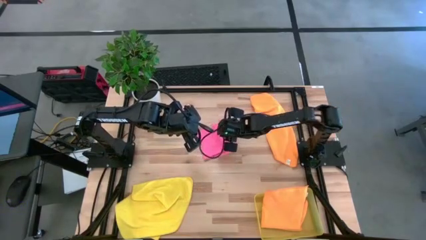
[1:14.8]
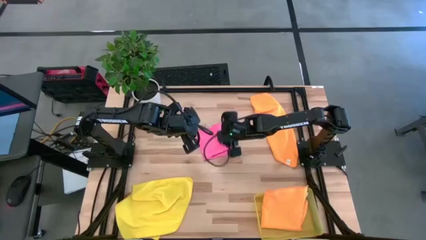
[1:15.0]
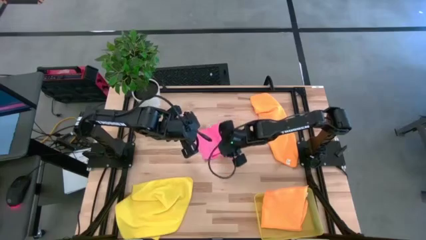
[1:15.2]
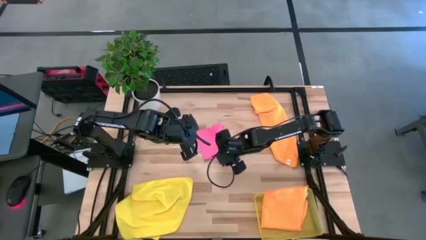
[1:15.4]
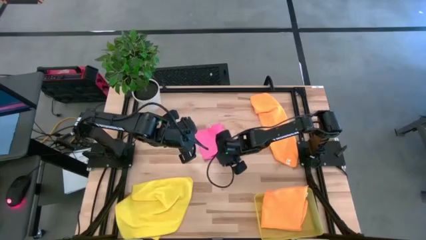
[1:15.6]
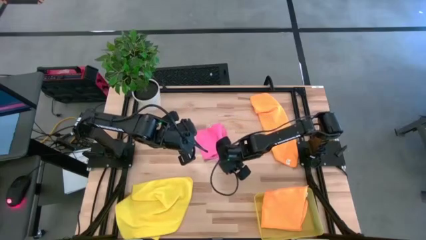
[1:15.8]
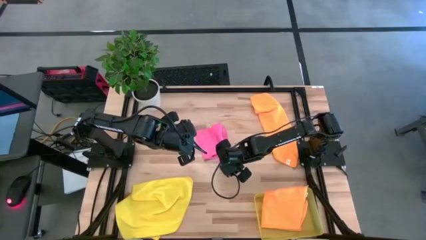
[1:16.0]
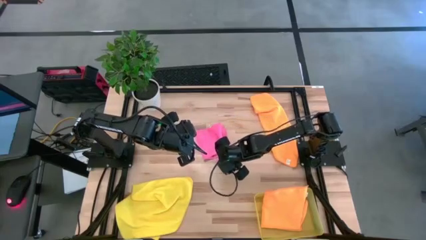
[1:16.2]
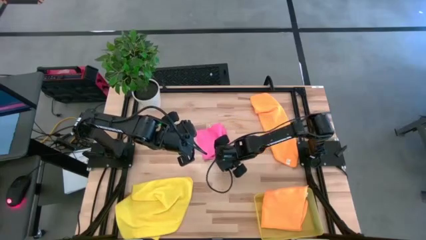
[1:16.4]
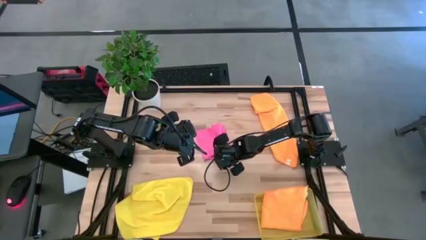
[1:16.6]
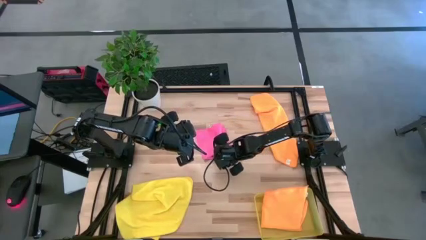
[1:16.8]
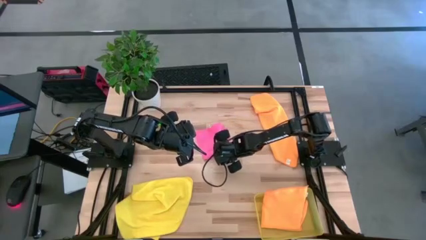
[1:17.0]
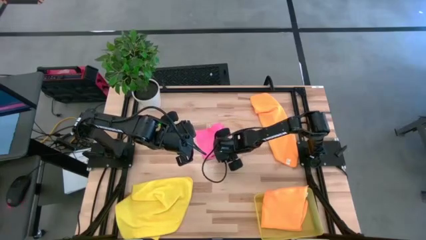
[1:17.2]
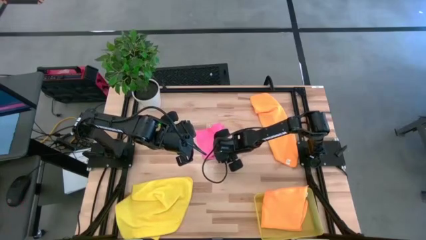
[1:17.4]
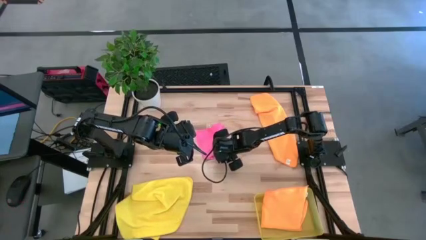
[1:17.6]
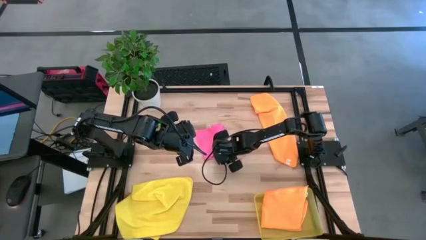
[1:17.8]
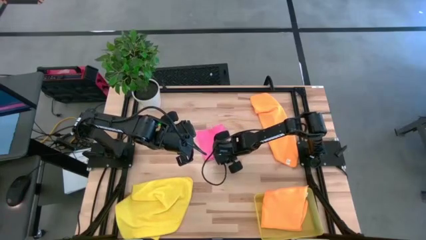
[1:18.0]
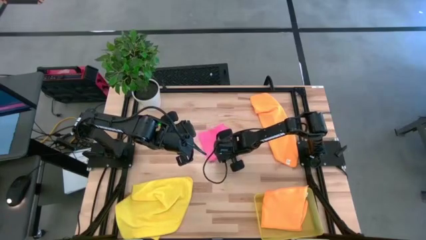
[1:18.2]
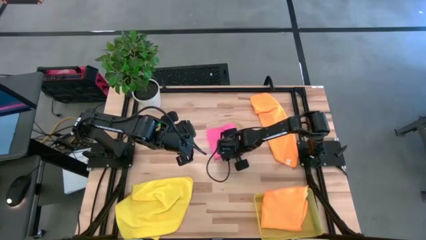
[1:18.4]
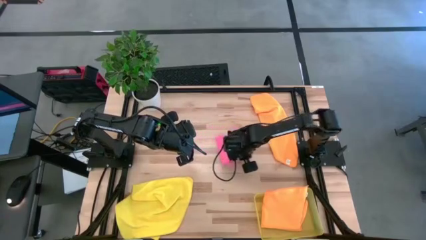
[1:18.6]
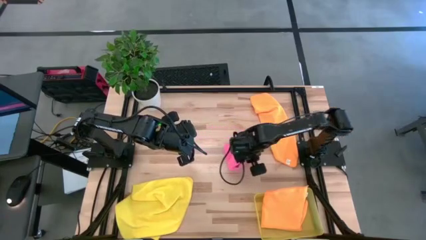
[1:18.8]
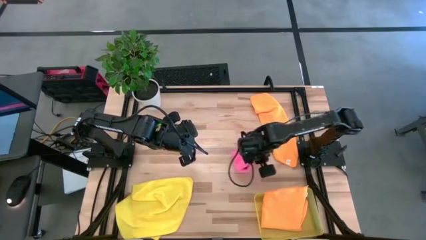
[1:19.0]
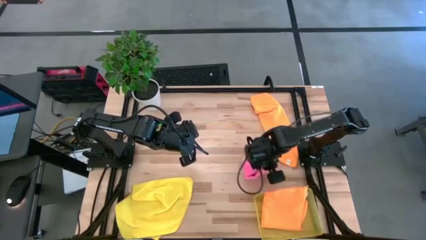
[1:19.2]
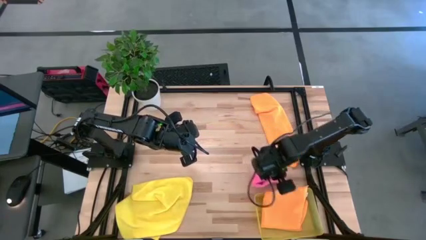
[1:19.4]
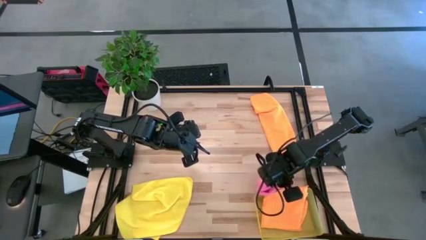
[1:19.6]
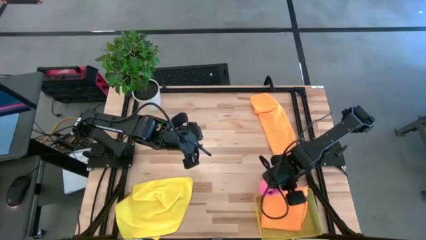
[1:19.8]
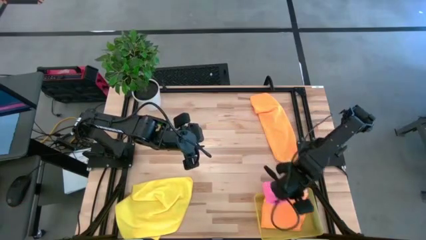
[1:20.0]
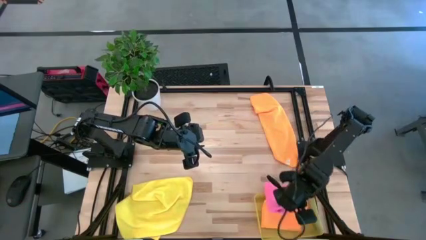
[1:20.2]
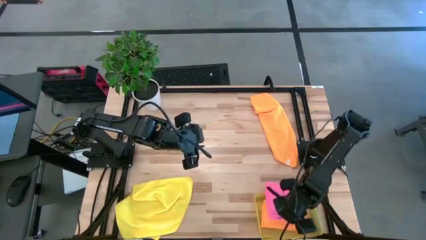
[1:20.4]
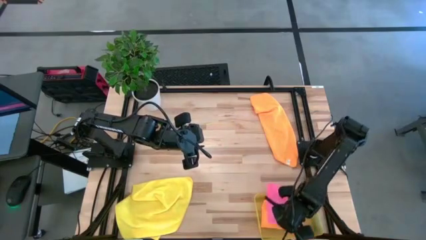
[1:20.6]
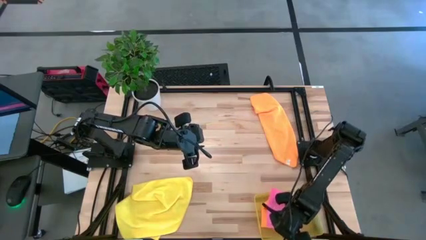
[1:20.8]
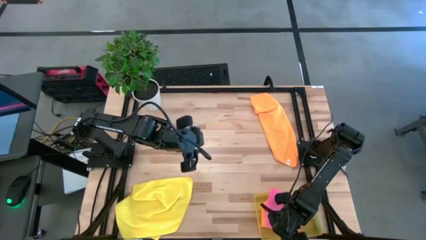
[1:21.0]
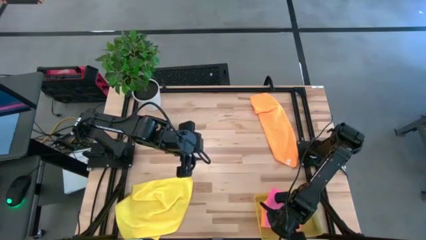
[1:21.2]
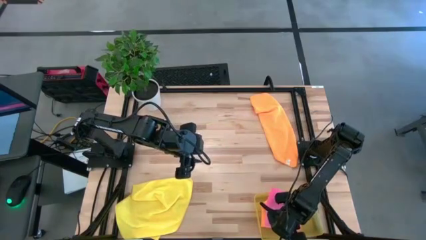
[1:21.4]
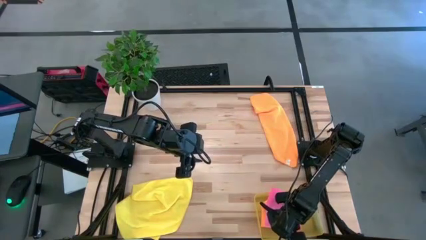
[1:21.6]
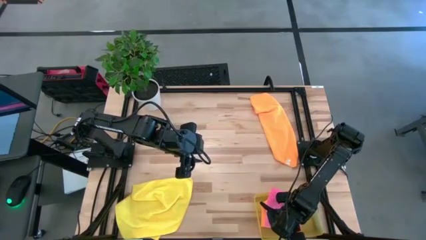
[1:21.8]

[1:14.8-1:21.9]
Task: Fold microfiber towels
Put the pink microfiber cloth into the bin

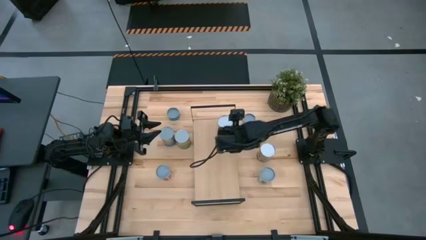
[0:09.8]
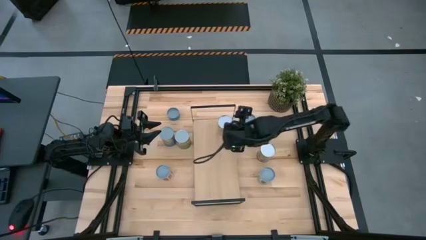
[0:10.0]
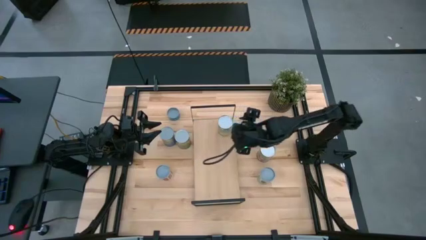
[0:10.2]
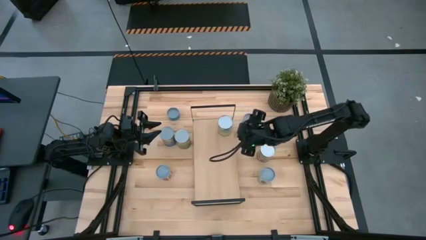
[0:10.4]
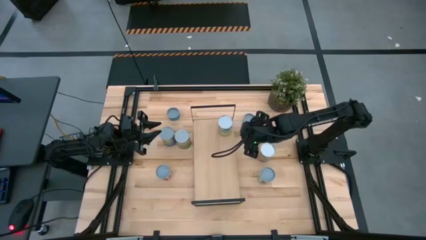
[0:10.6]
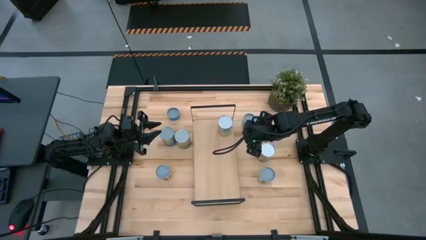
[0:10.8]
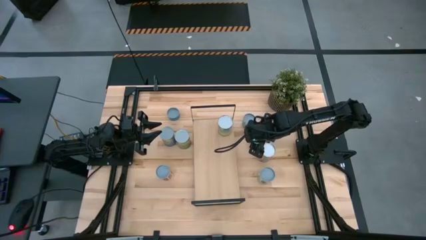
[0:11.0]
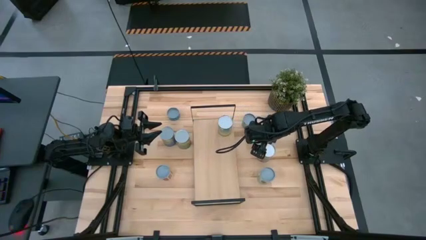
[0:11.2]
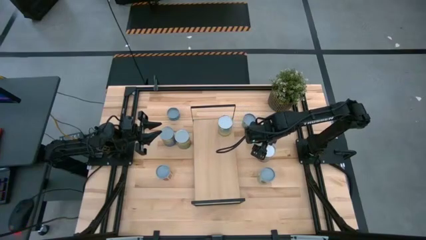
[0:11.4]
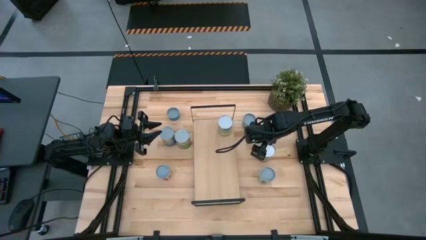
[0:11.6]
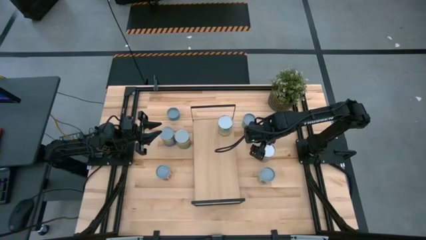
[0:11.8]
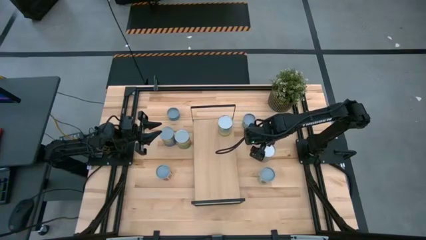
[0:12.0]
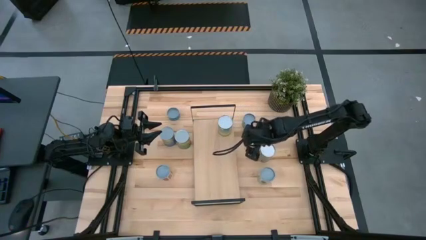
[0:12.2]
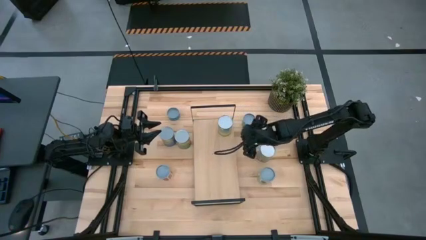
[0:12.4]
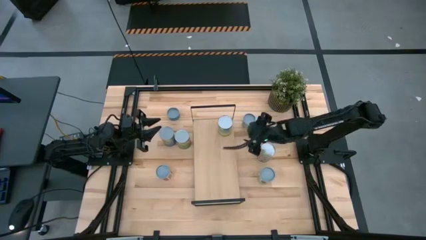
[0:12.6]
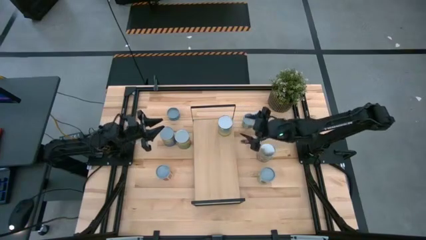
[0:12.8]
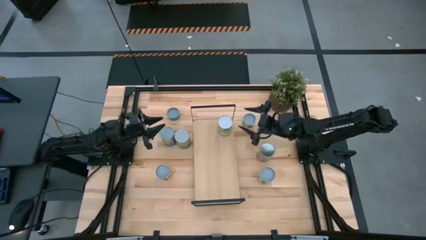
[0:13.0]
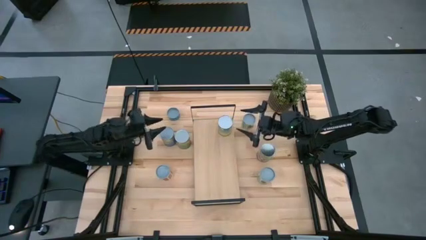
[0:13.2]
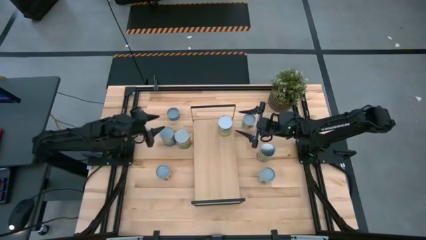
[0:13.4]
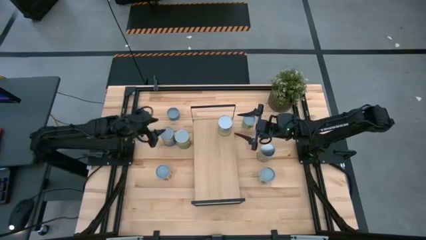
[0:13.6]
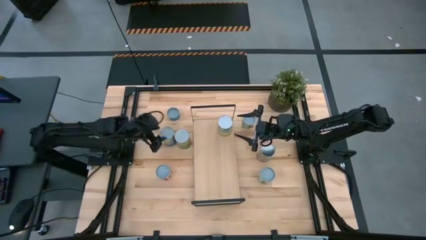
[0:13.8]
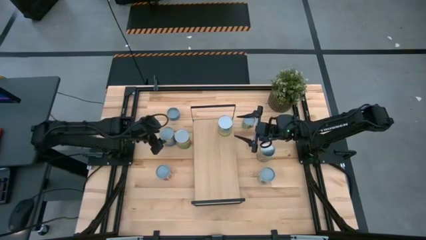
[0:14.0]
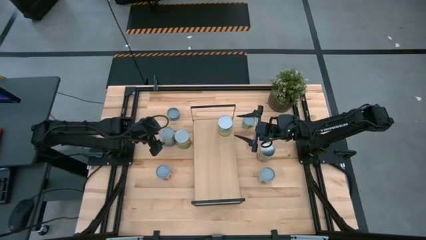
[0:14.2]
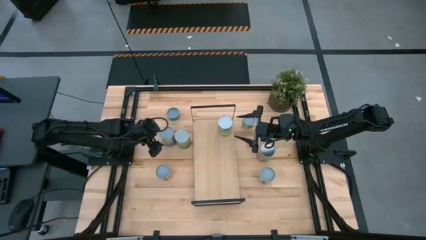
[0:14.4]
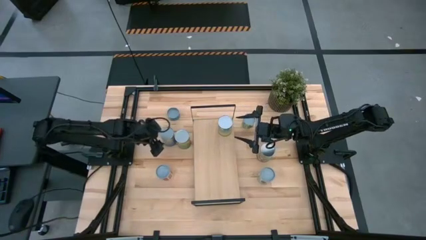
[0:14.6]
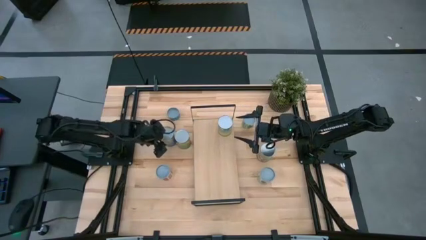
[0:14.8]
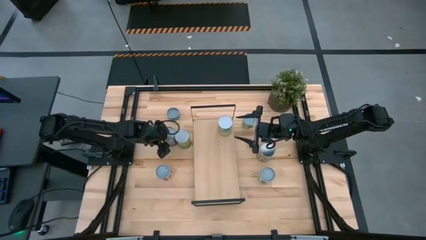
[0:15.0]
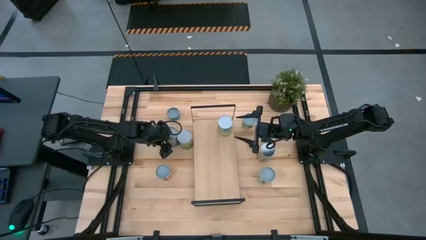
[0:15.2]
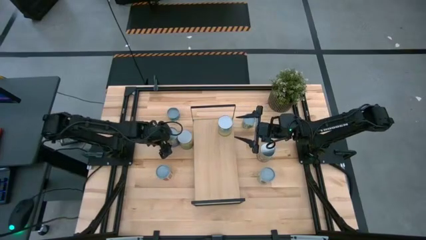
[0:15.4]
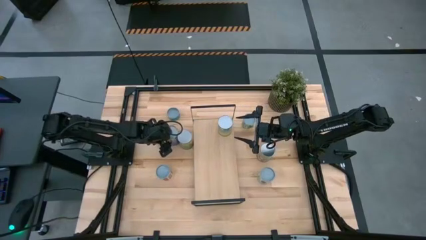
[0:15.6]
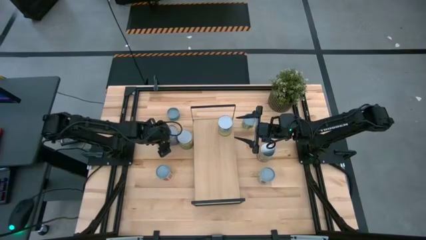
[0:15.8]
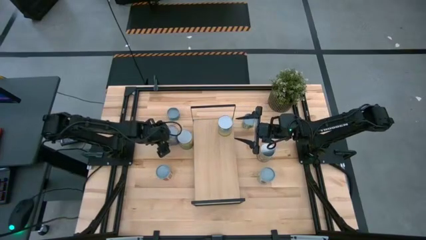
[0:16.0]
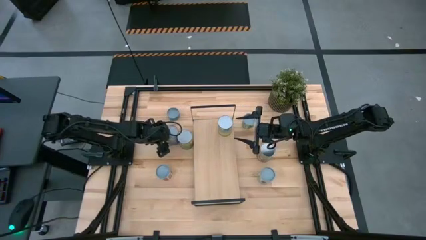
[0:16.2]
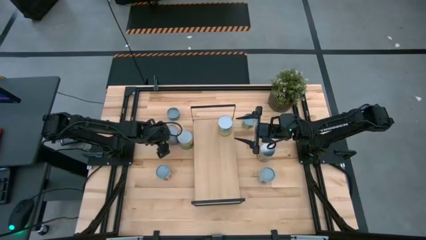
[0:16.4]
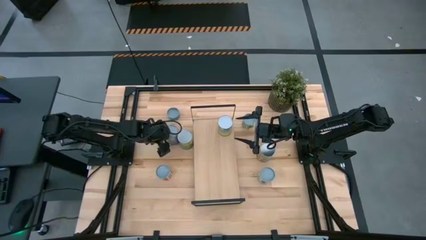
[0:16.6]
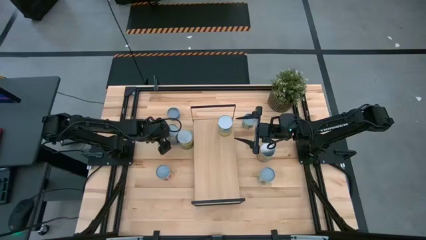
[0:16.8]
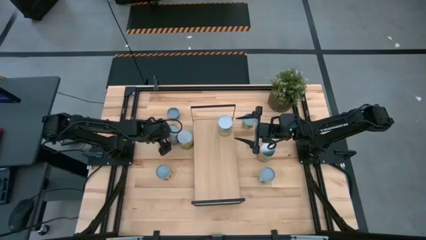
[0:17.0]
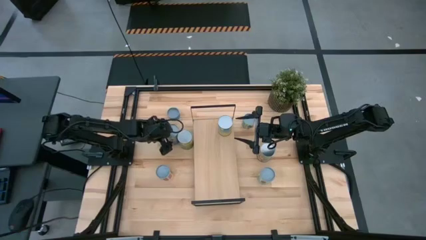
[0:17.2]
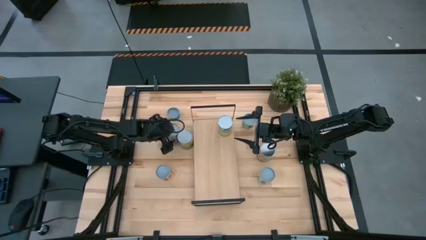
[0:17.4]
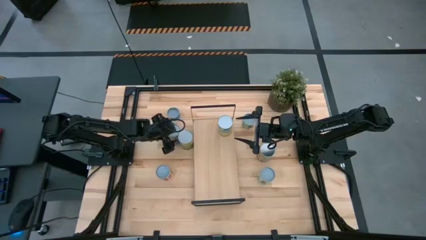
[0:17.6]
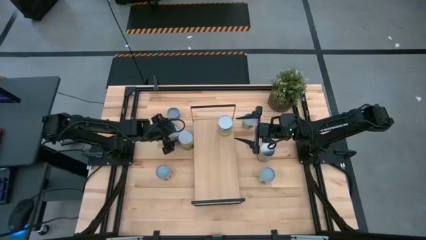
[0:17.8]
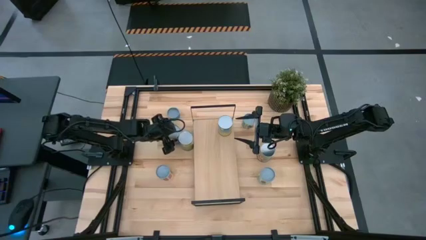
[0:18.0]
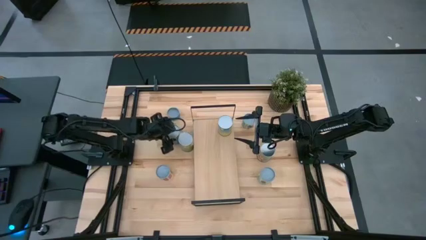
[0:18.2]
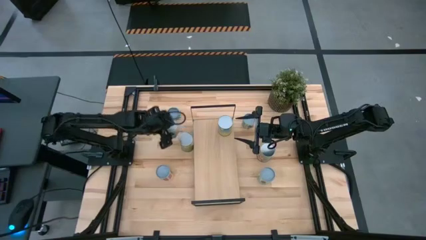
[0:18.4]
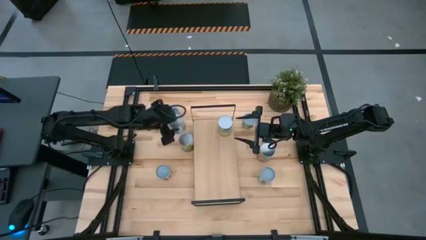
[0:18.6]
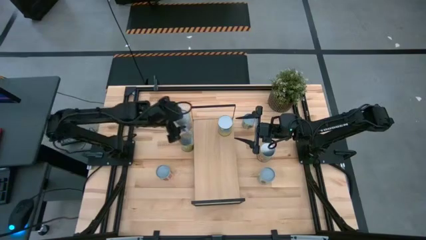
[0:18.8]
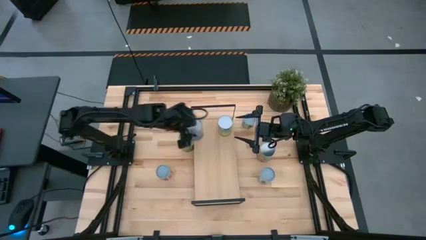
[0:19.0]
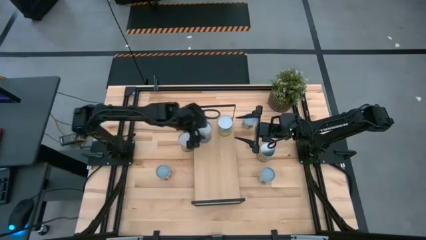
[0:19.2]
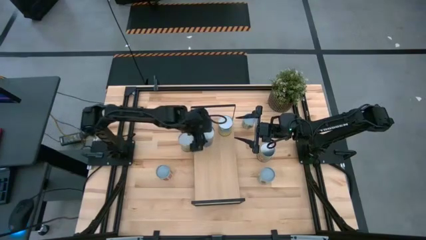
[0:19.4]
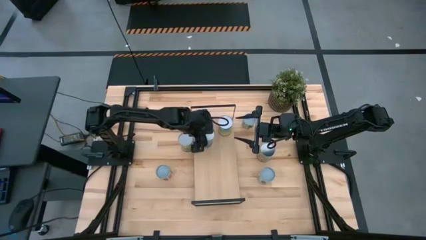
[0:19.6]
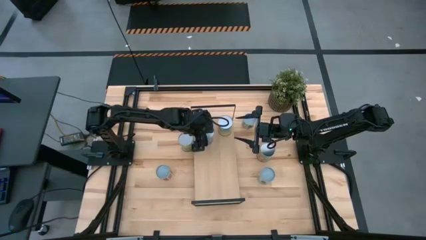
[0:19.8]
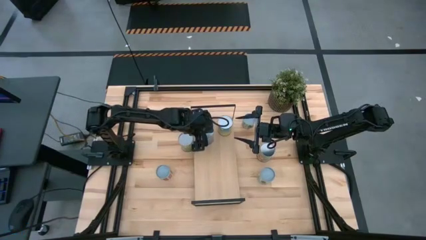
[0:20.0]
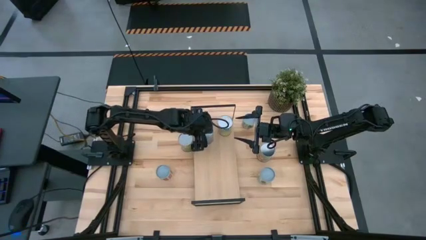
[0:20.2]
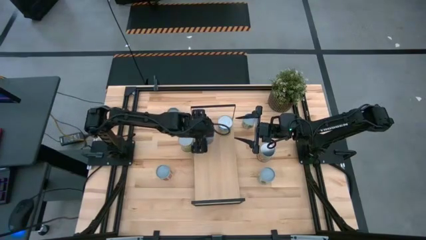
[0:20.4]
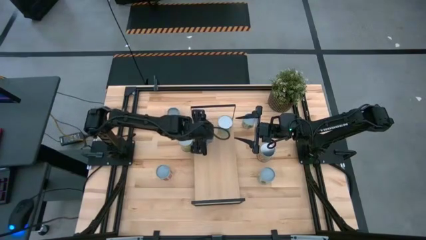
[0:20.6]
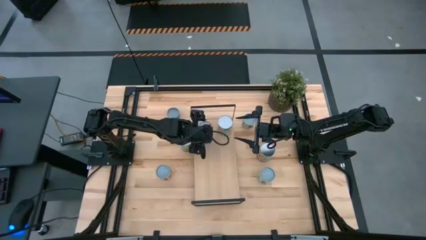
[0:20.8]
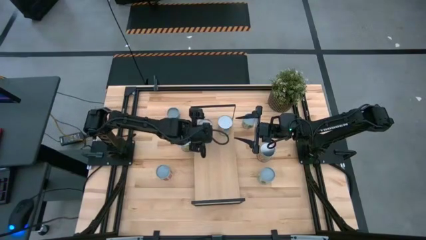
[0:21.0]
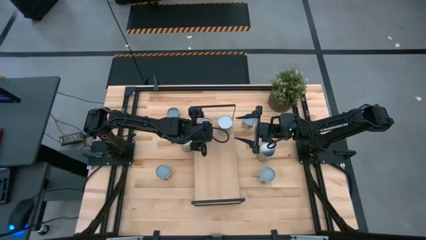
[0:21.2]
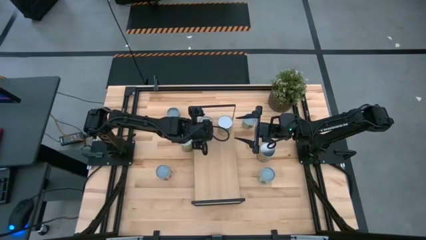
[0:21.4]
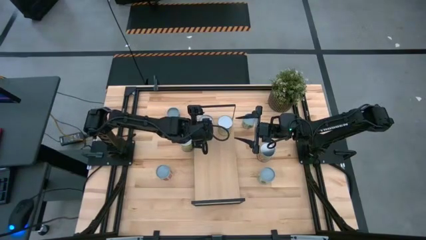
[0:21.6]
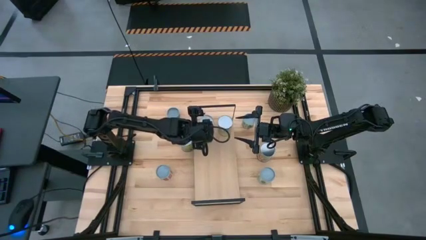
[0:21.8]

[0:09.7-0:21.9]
Task: Pick and place cans onto a shelf
Put the canned peas on the shelf
